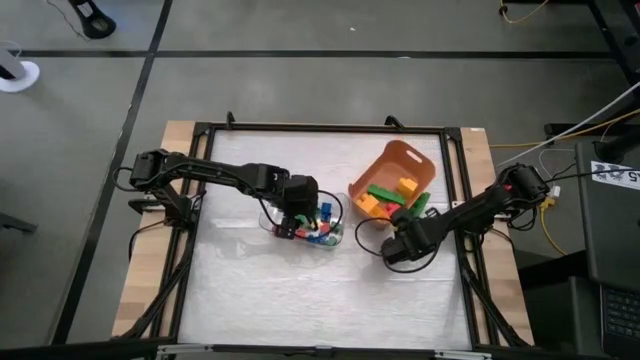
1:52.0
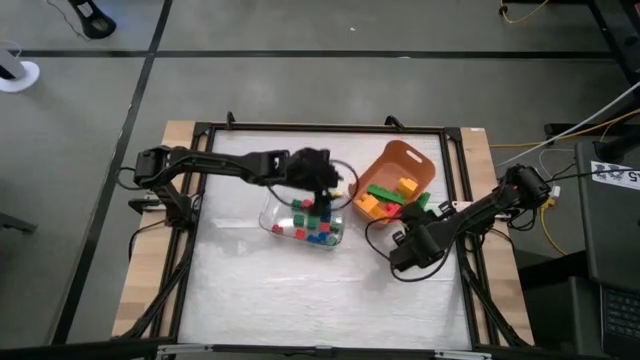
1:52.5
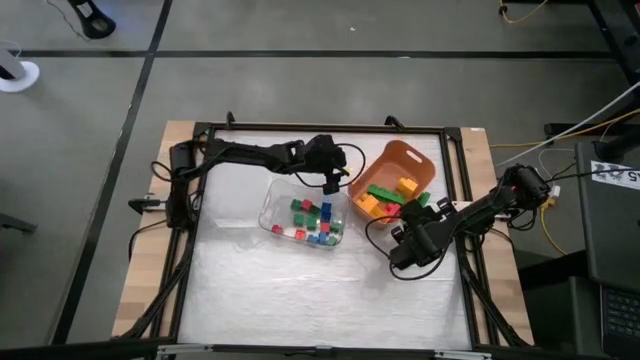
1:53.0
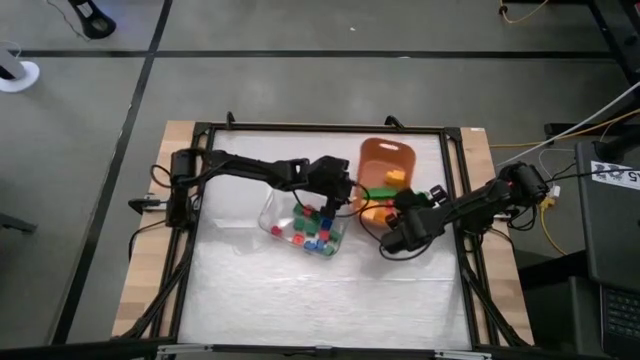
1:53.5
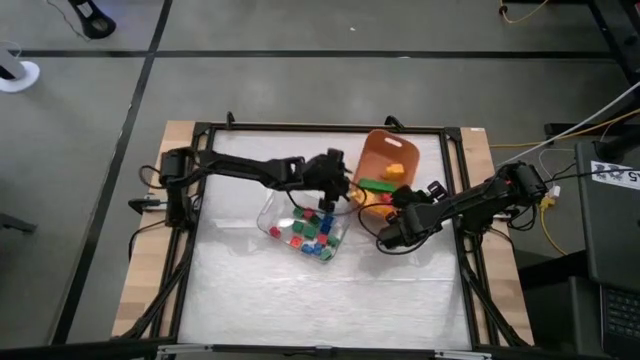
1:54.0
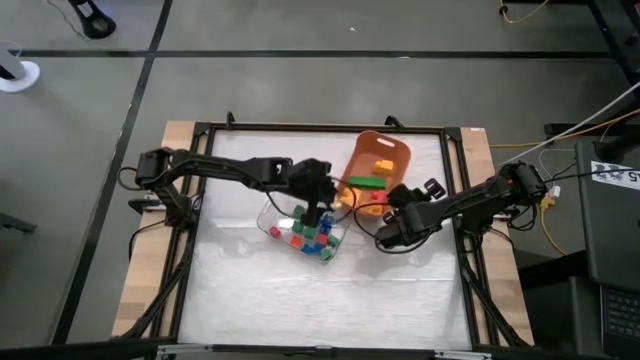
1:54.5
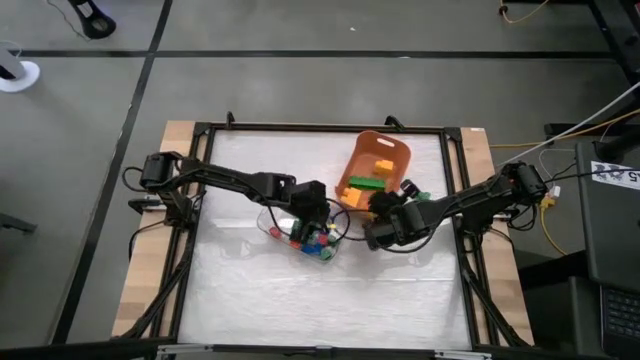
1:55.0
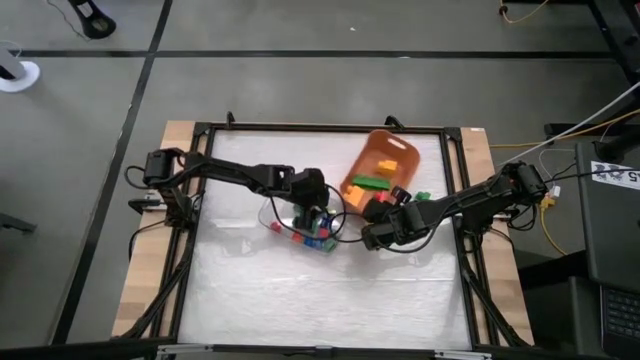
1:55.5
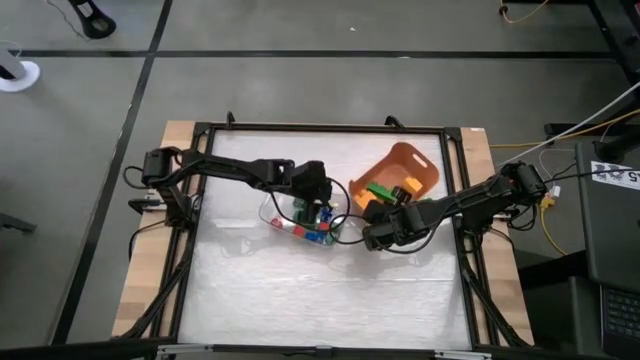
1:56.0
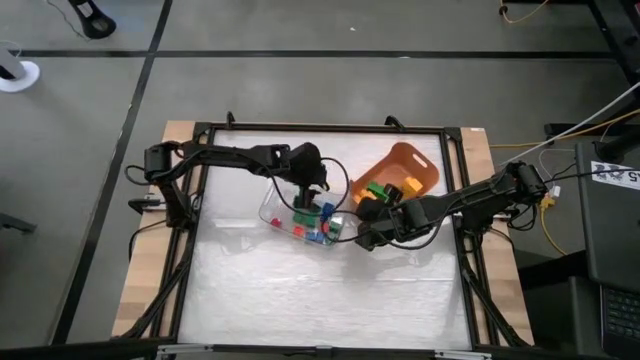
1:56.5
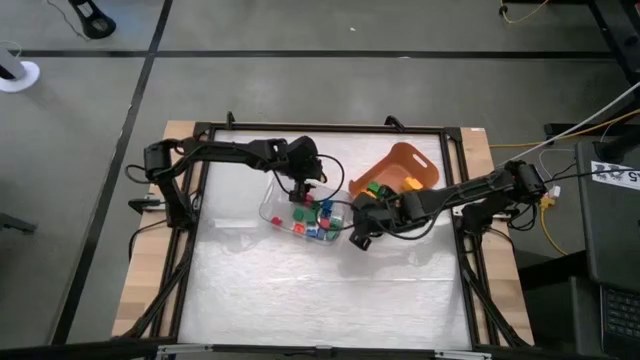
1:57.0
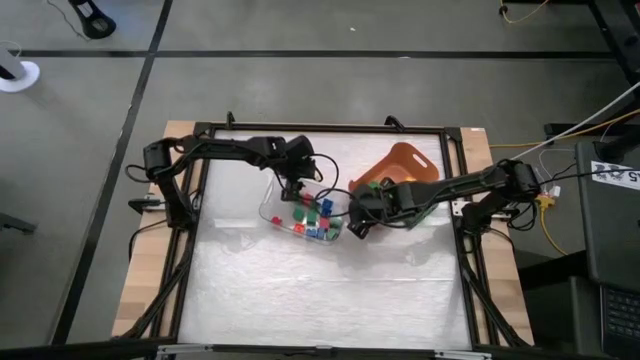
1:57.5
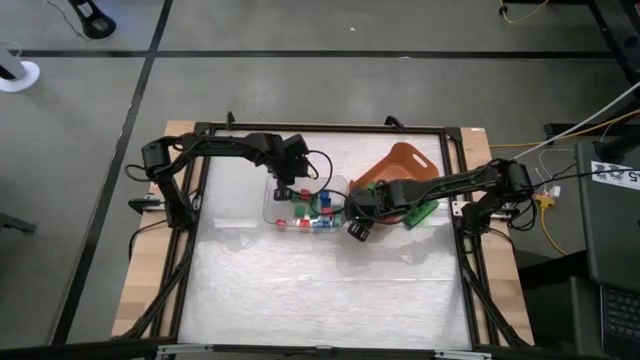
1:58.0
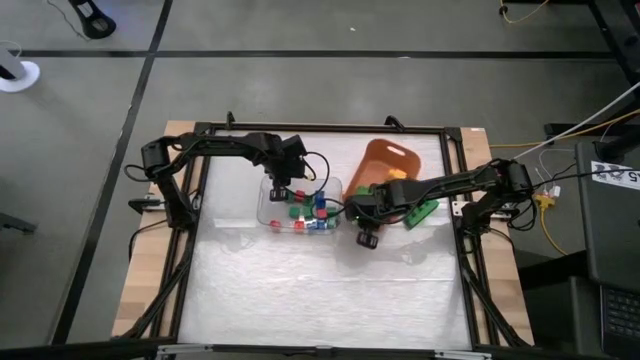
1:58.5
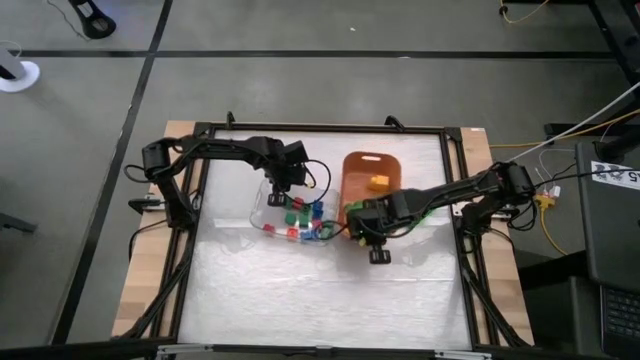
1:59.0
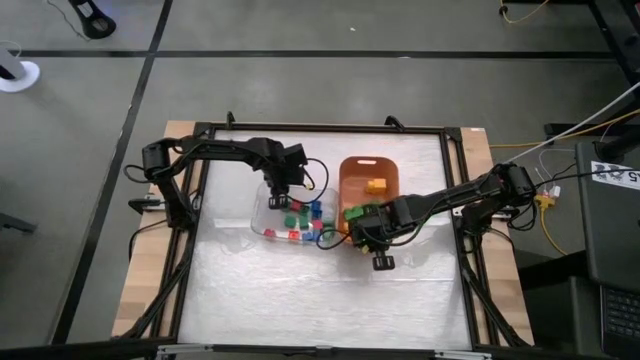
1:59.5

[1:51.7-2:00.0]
Task: Sort blocks by size
Adjust the bins

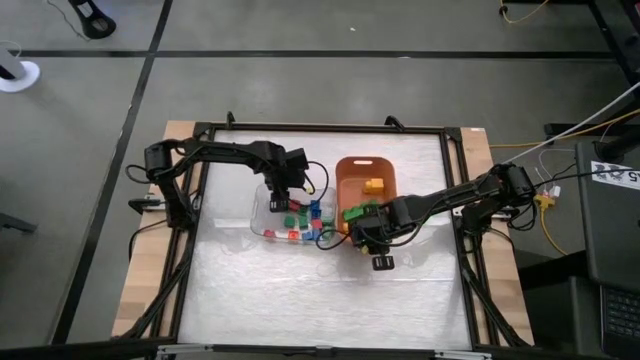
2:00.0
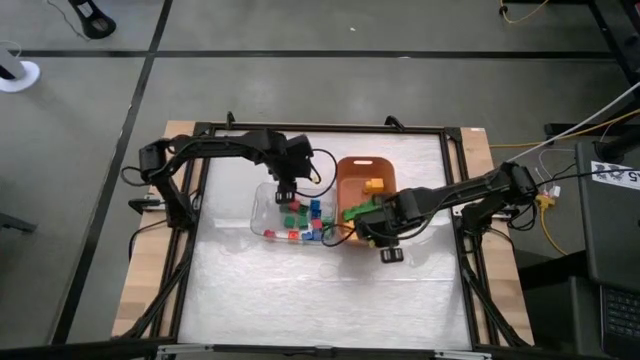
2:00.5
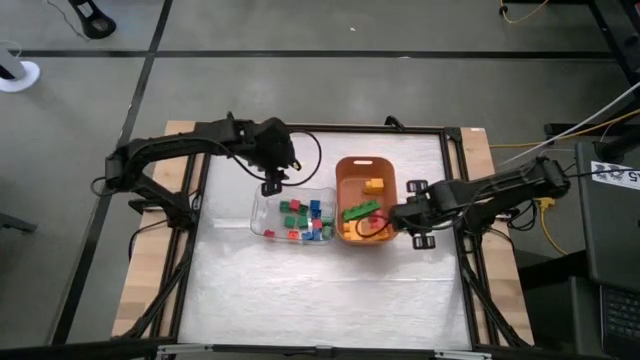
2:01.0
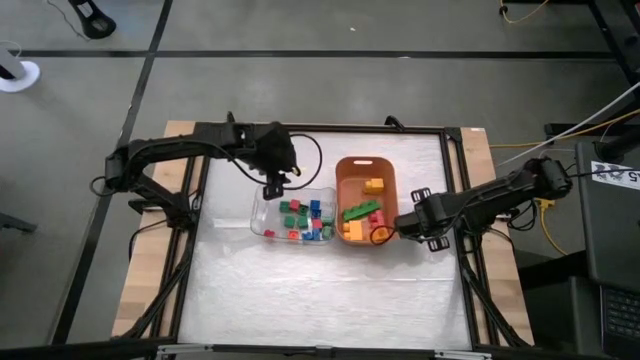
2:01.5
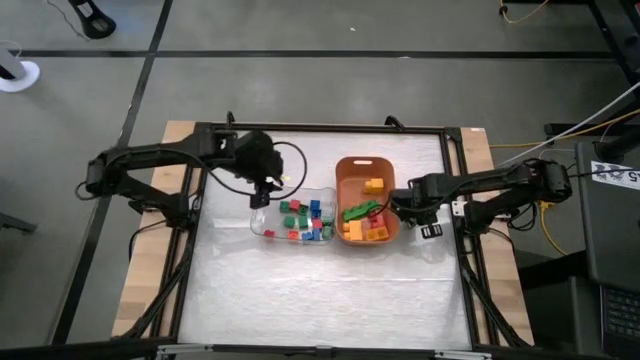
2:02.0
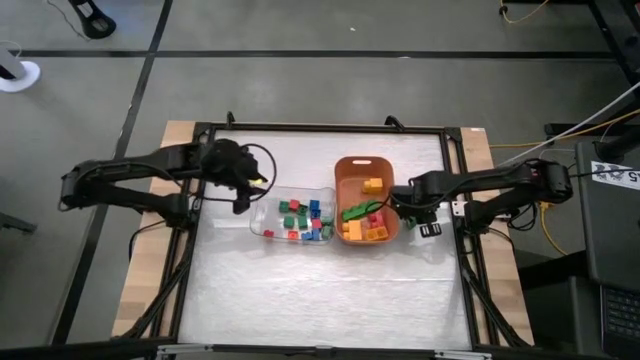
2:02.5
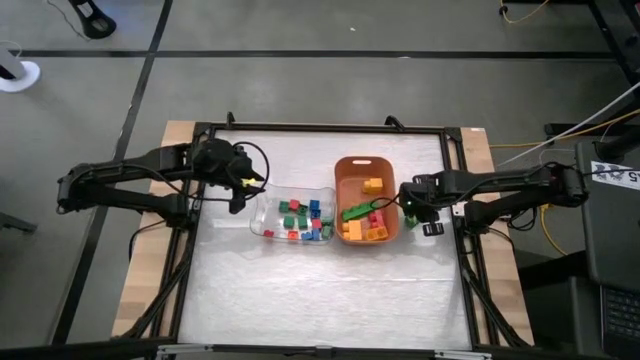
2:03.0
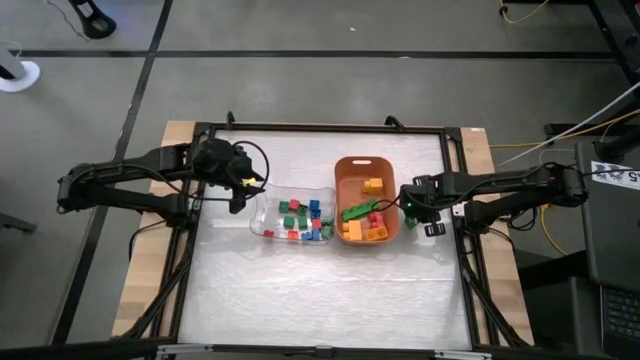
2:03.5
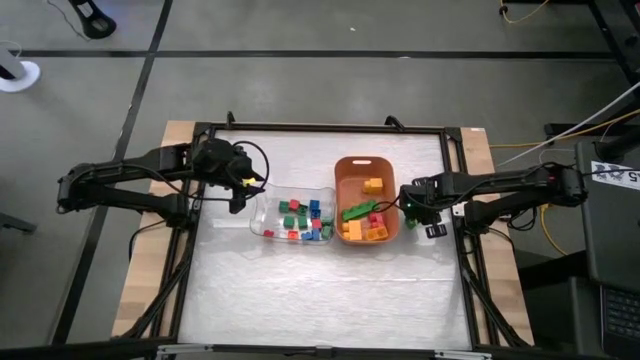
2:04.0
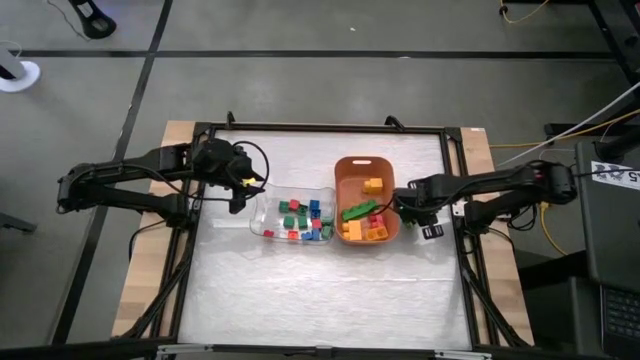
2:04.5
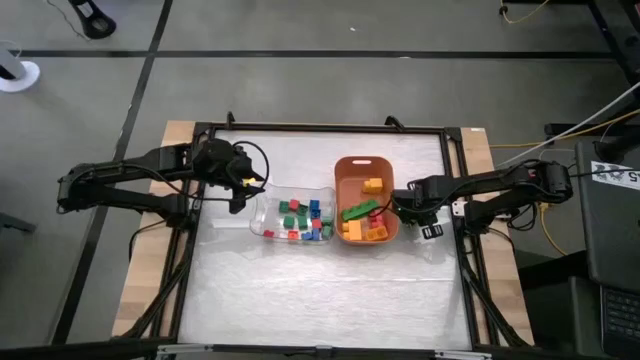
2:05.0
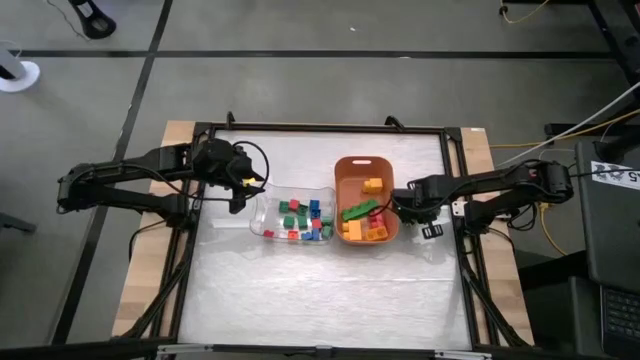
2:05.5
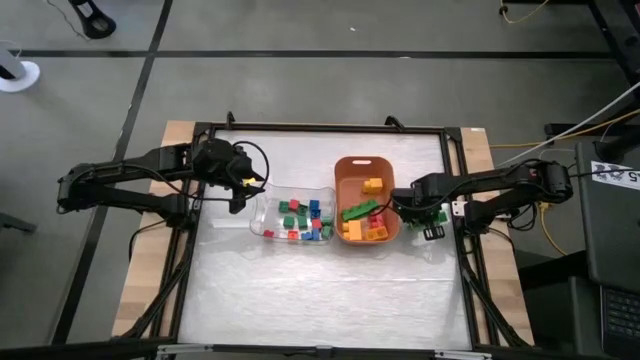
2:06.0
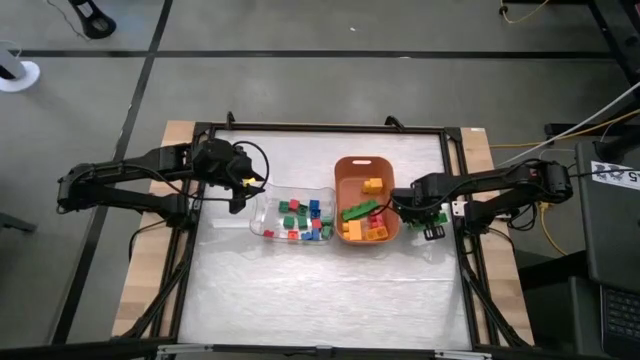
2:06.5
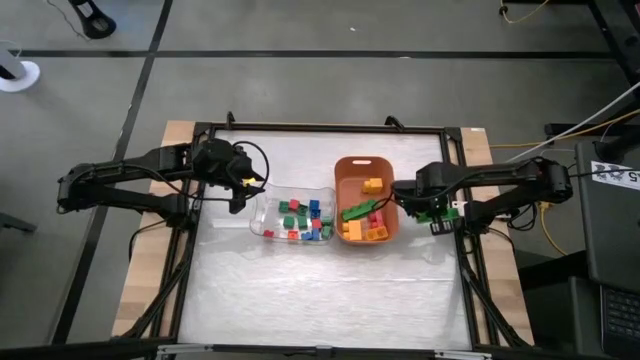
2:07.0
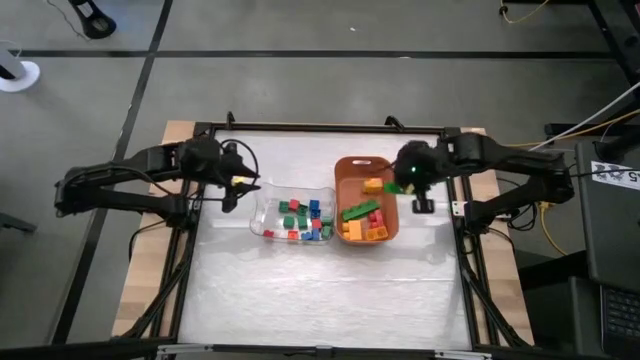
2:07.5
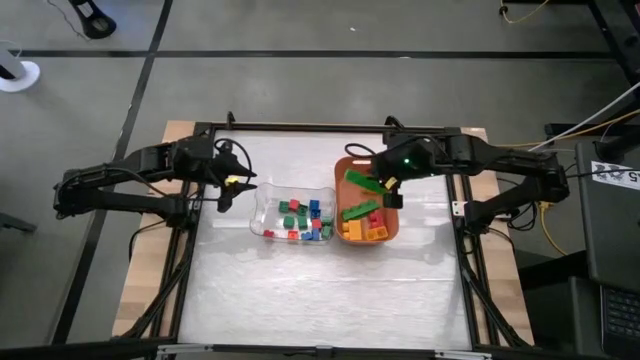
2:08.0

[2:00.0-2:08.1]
Put the big green game piece into the orange bin

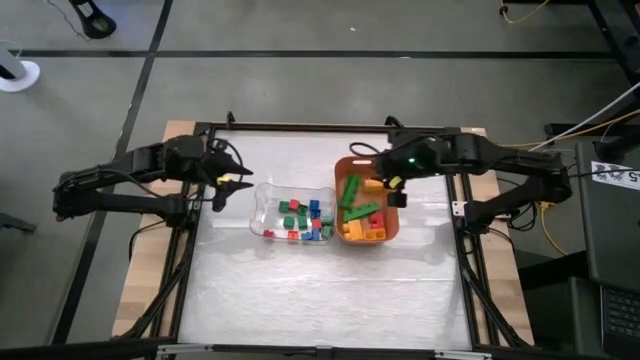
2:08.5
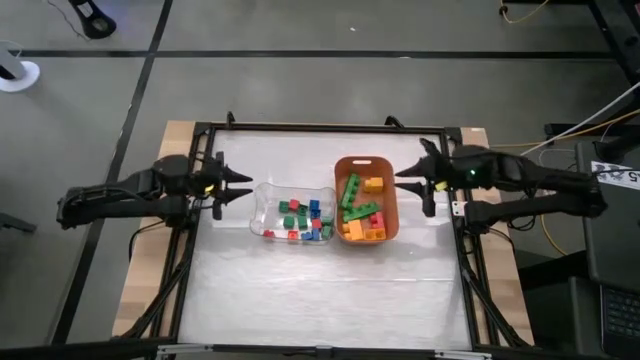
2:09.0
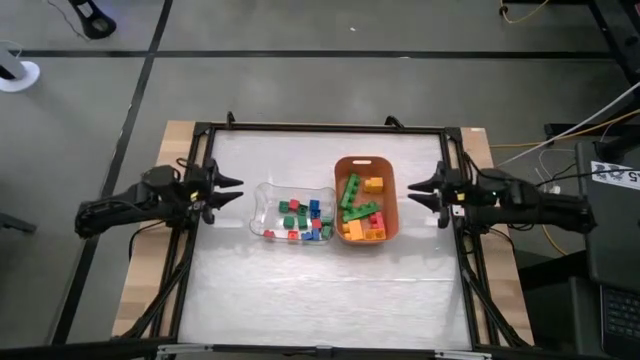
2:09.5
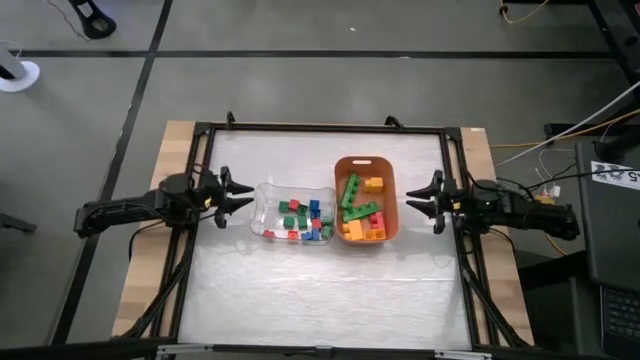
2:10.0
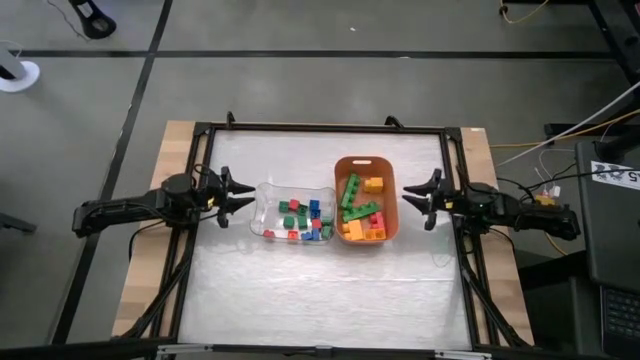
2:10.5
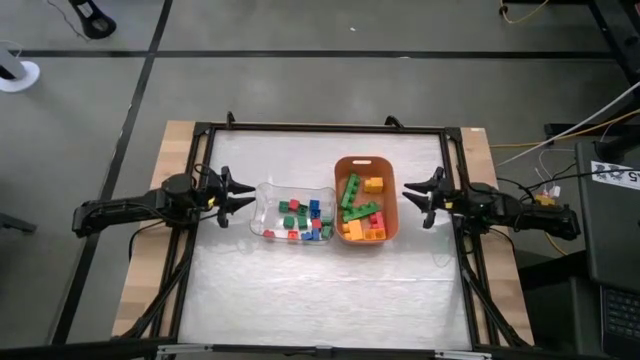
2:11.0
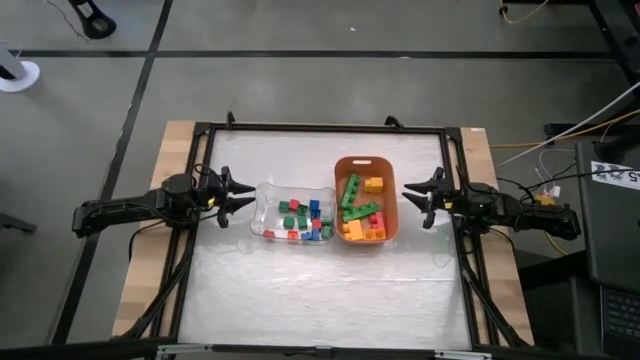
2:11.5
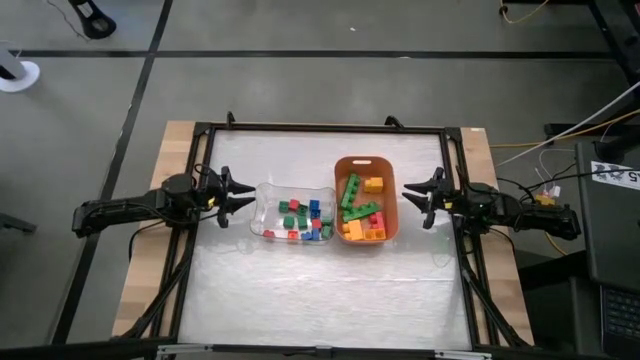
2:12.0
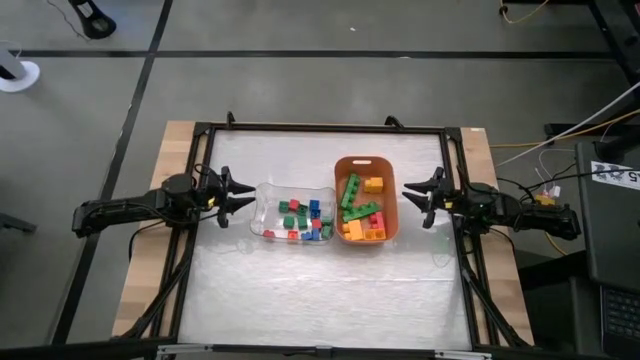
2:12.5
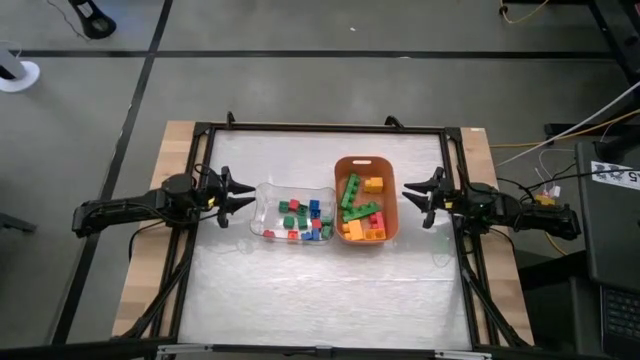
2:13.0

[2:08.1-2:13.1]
Return to Home Position

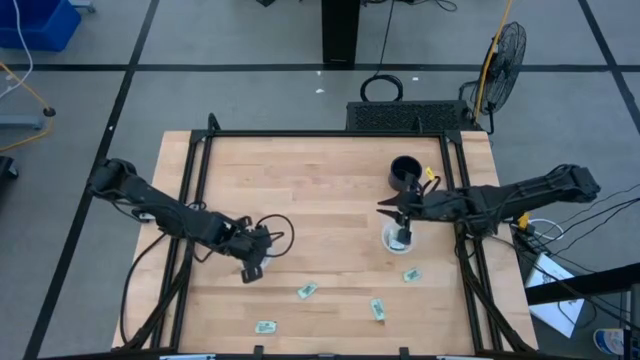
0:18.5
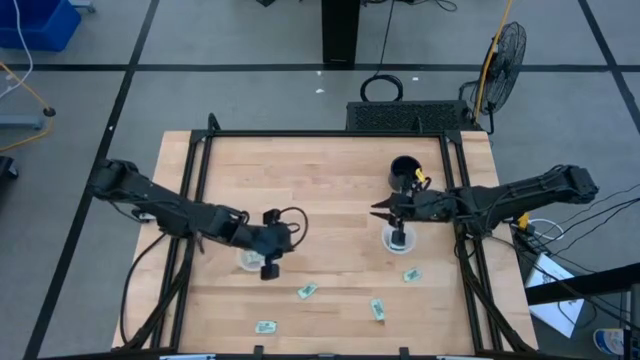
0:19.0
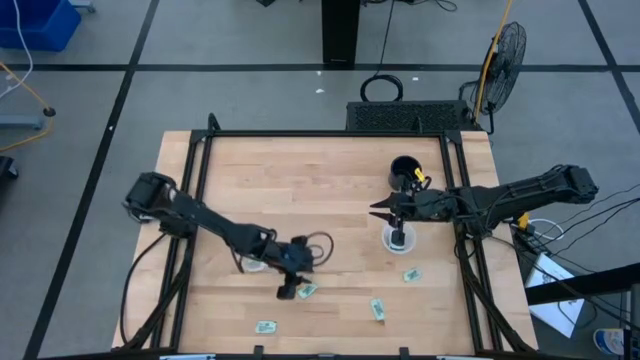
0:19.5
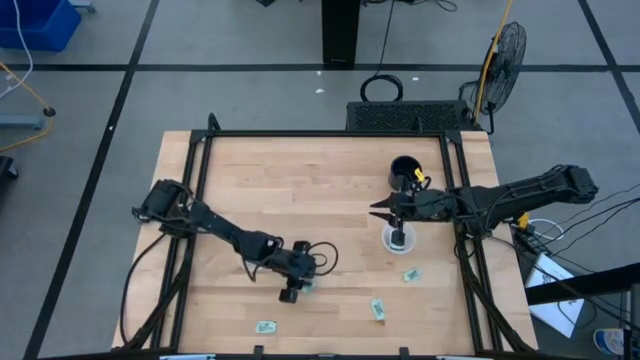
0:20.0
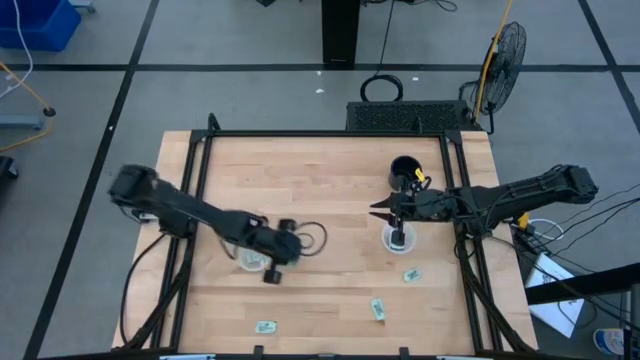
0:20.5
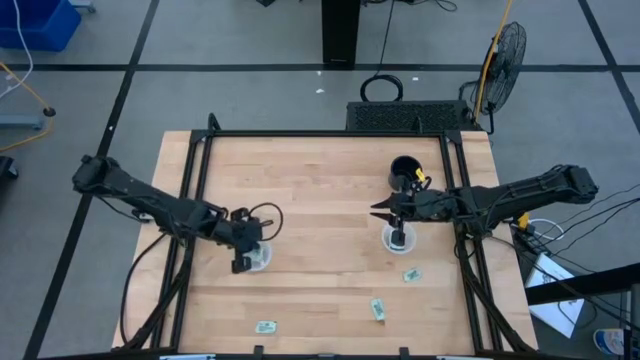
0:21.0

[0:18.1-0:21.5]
Task: Pick and place items into bin
Put the white stevia packet into the left transparent bin
